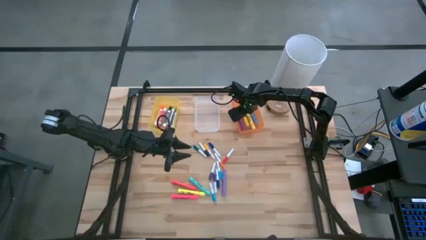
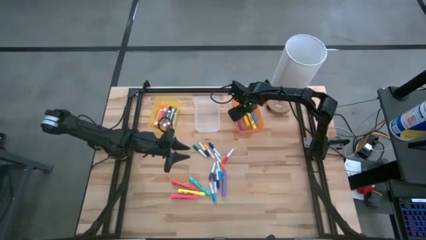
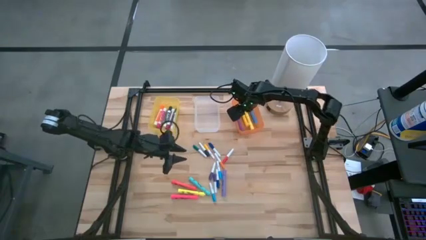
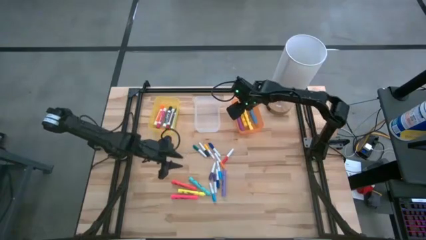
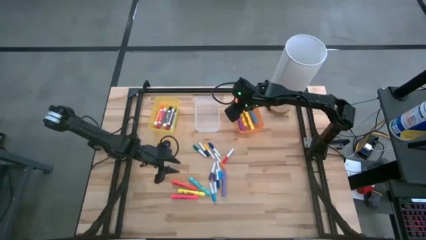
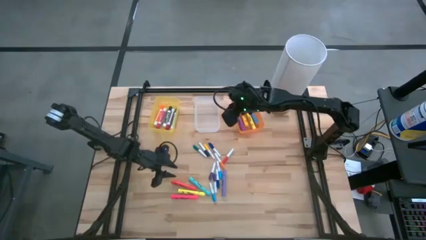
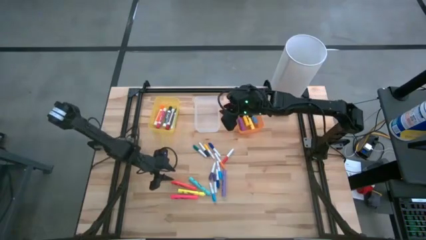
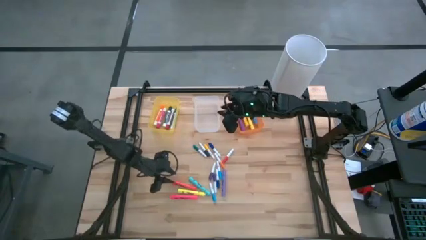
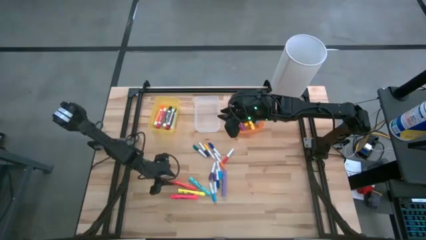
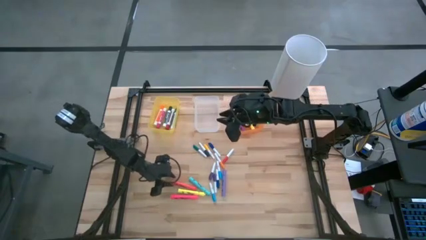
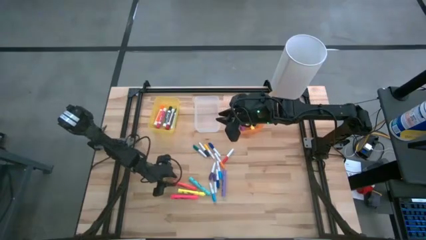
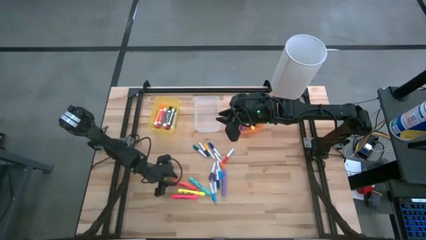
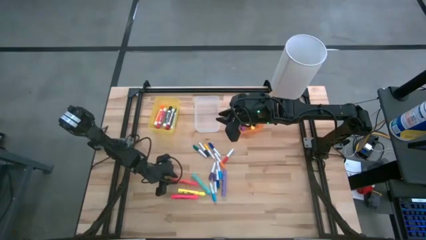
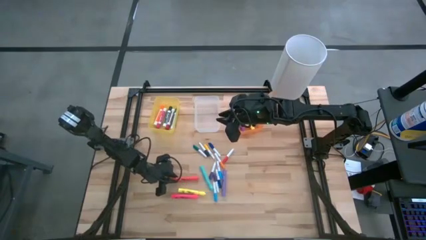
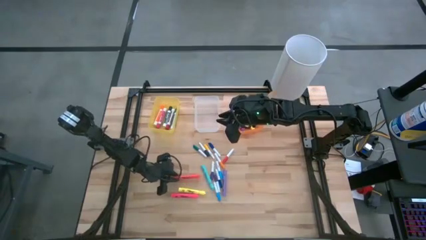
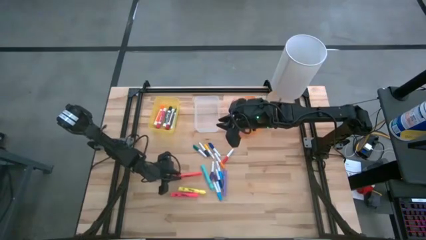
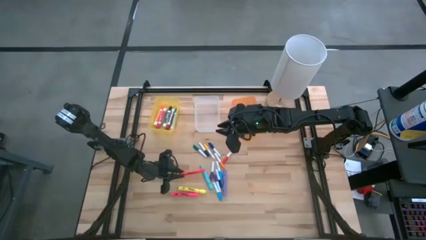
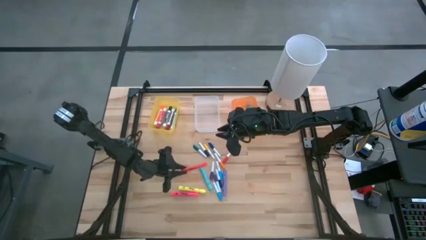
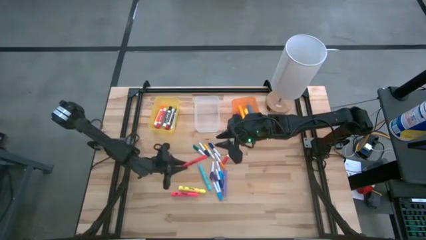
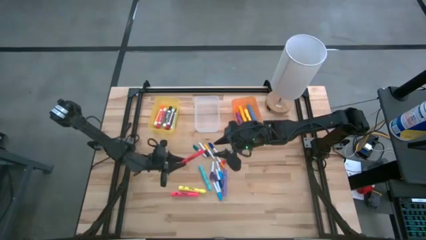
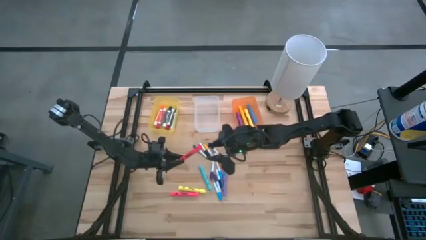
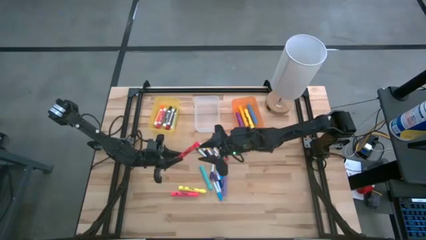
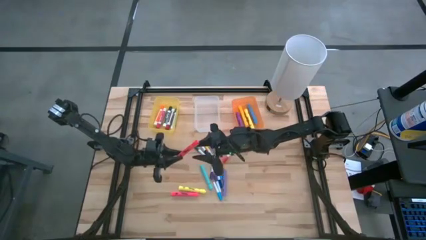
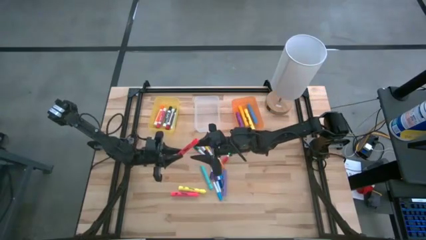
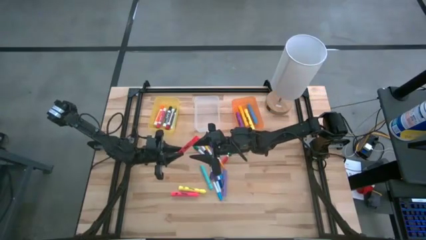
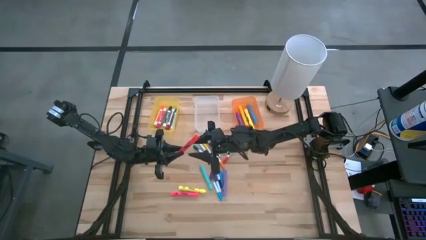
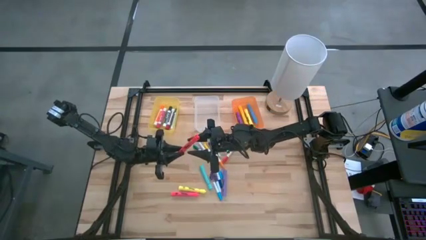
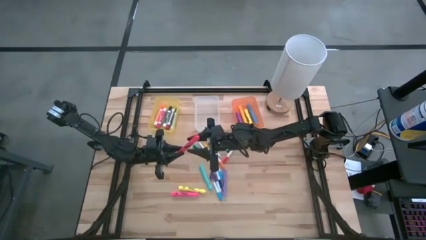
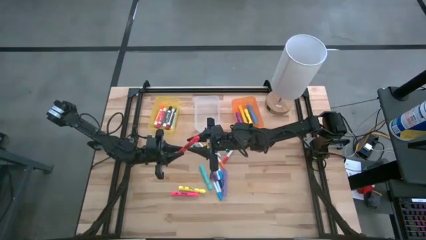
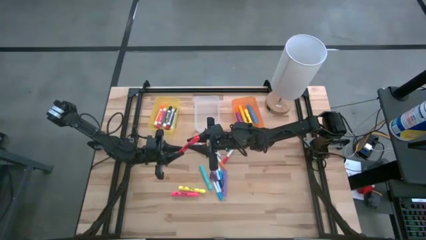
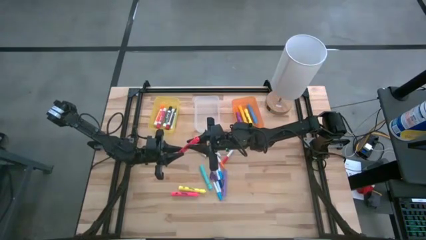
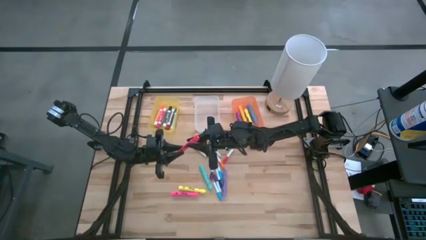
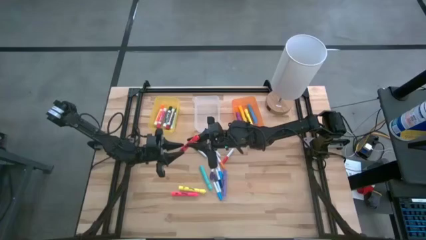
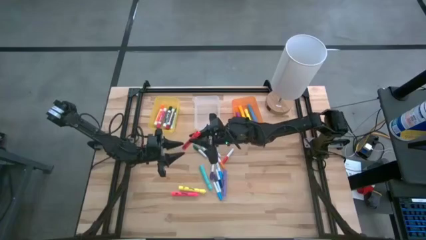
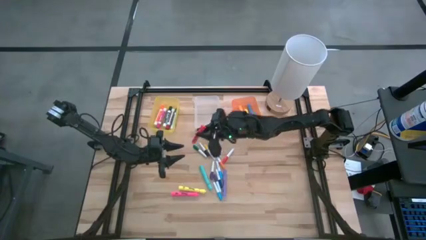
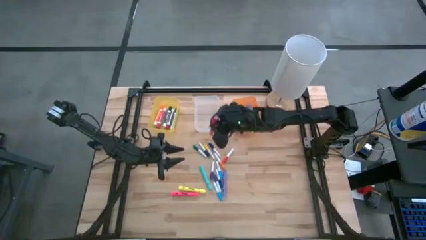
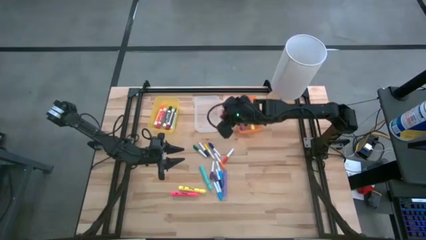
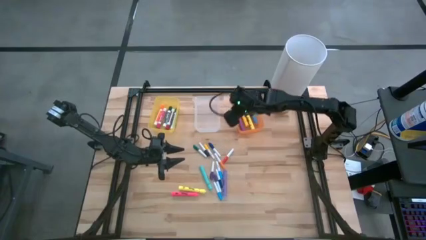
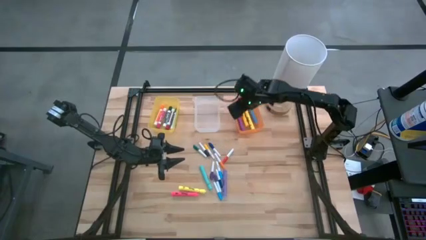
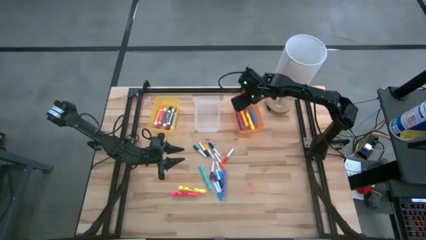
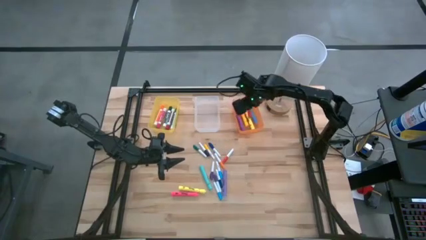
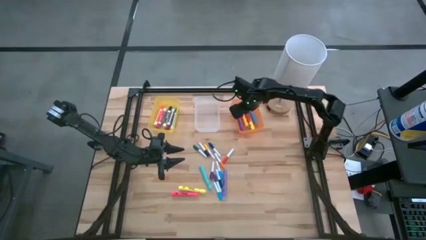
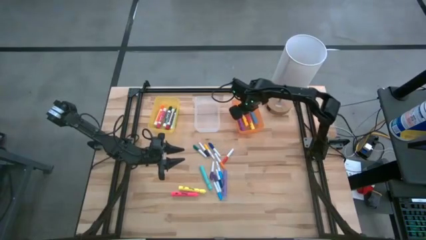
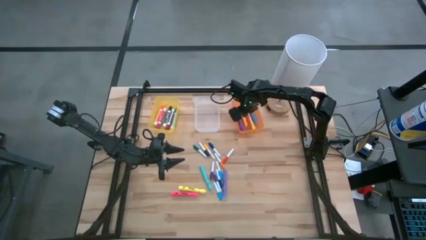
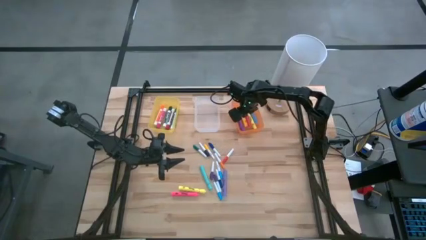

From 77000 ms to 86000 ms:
Task: Pick & Place Markers
Put the large red highlighter pen into the orange bin

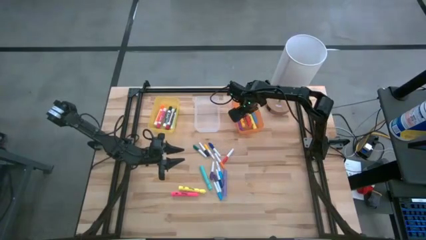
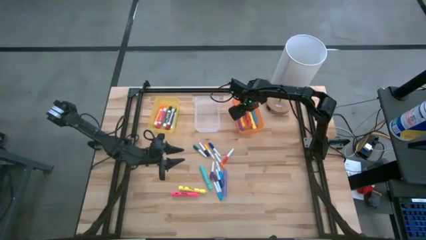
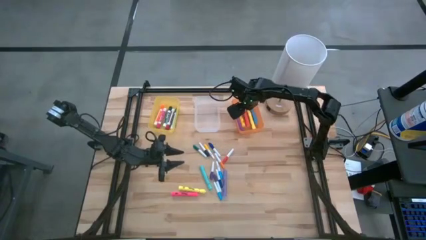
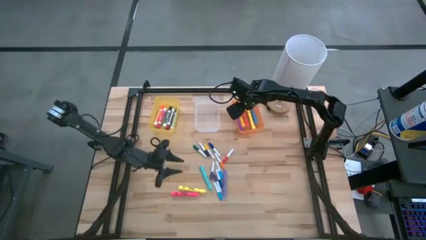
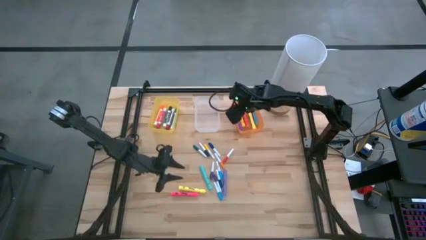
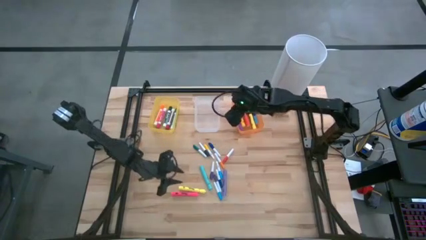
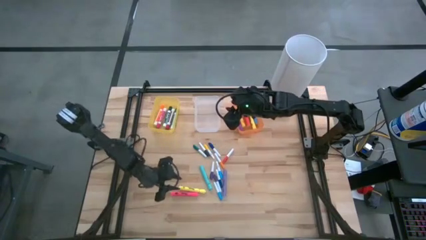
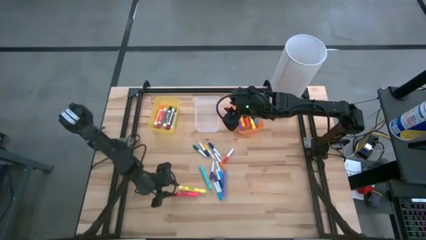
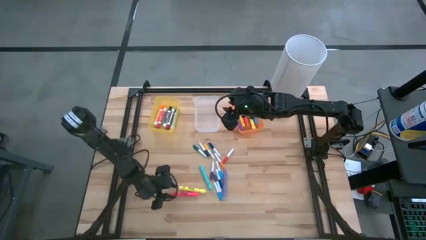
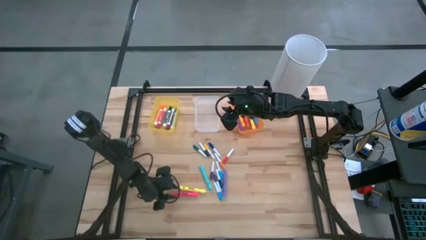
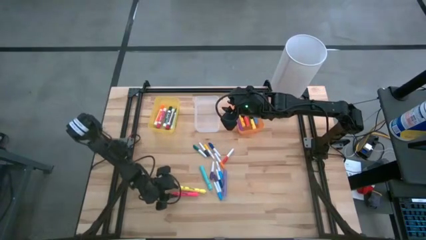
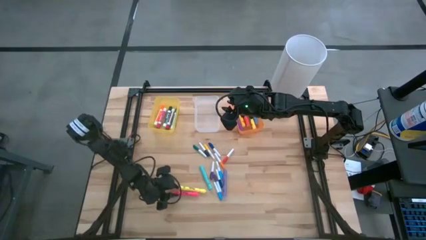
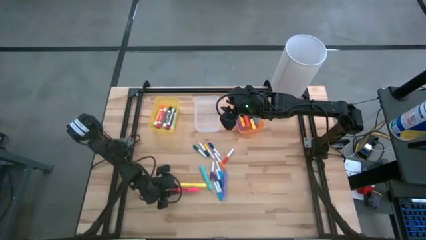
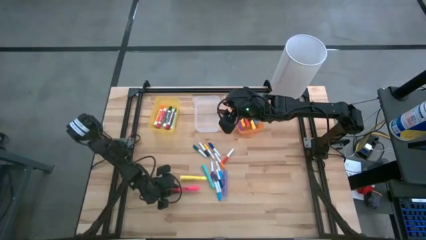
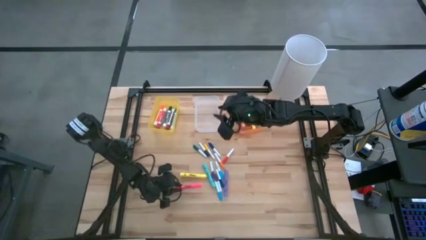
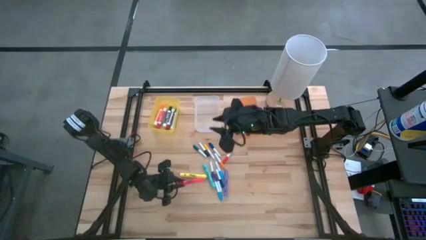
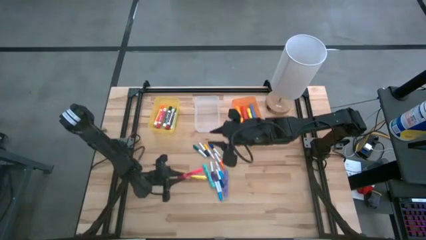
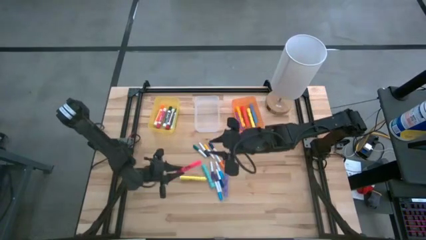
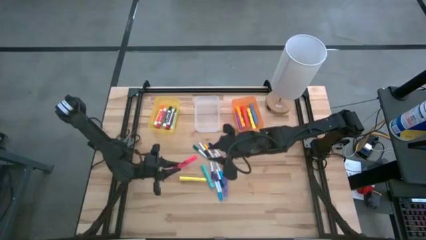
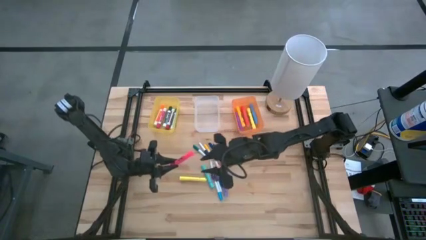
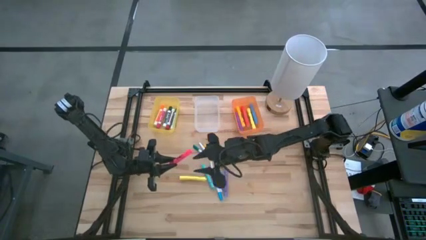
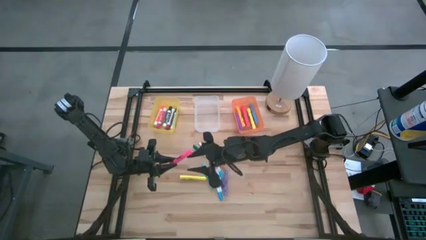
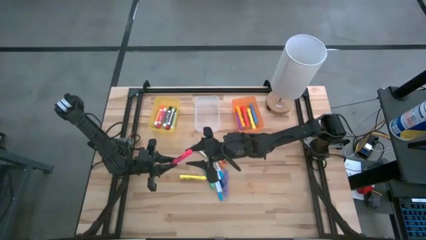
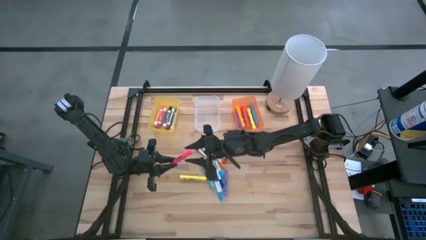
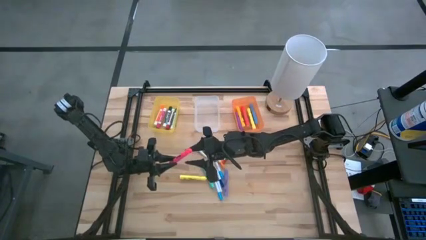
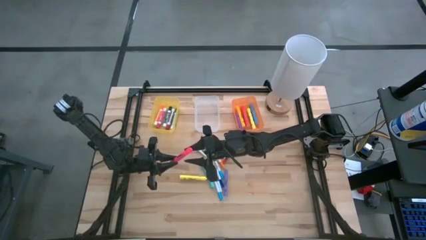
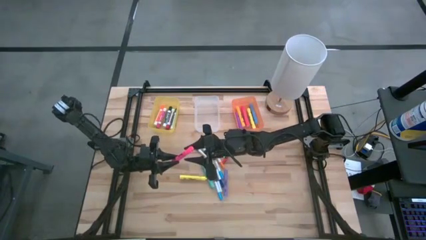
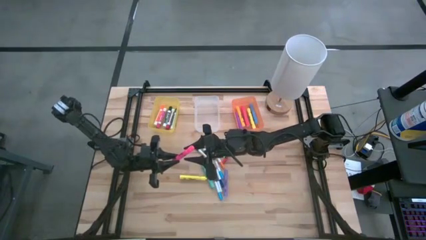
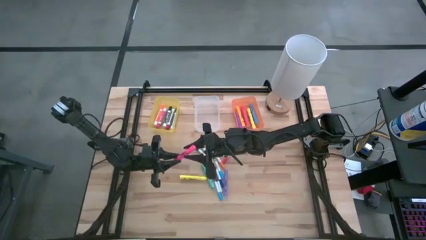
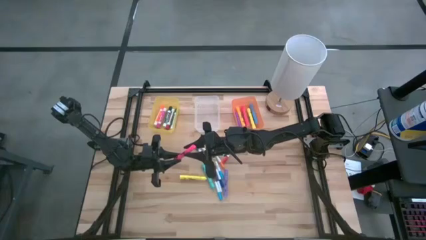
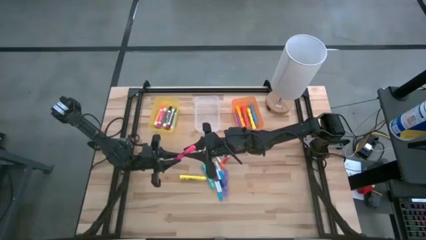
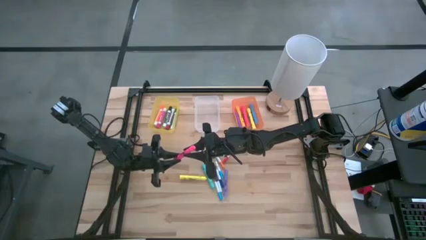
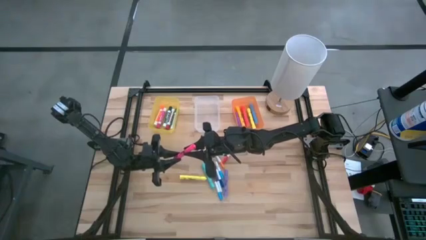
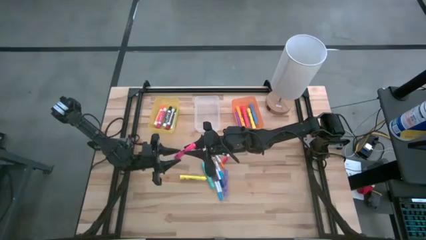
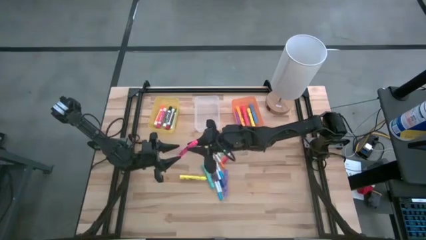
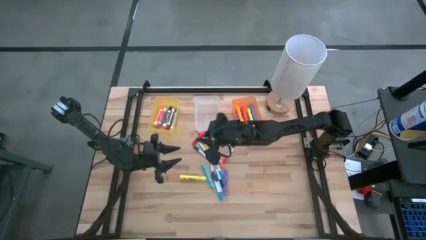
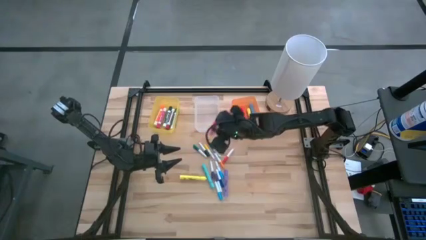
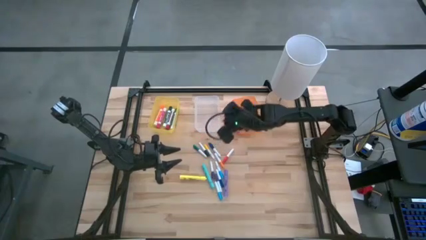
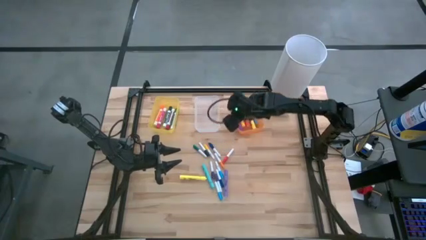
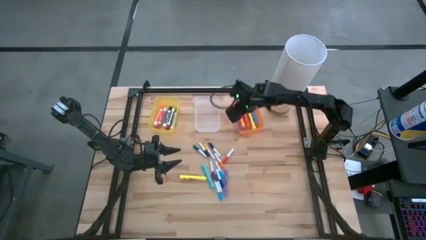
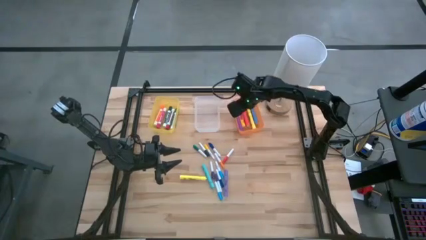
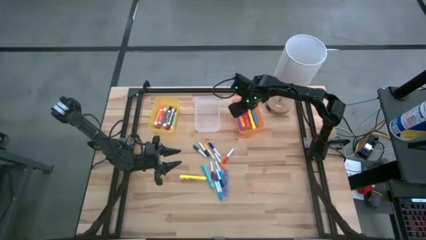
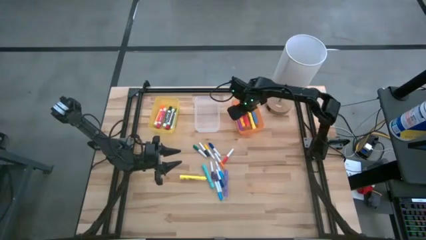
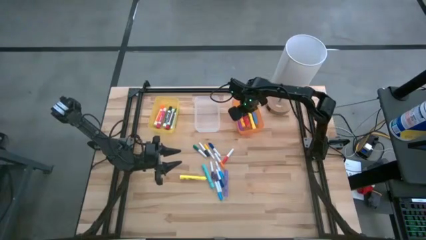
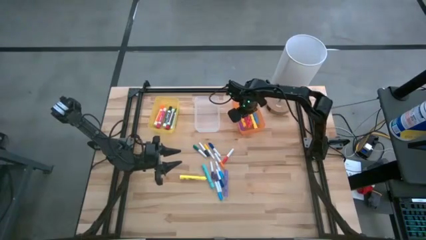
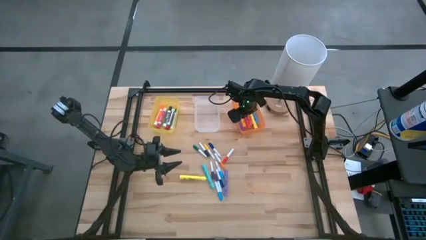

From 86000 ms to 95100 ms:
Put the large pink highlighter pen into the orange bin
